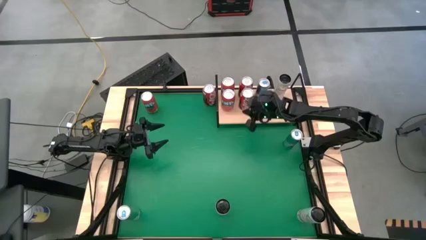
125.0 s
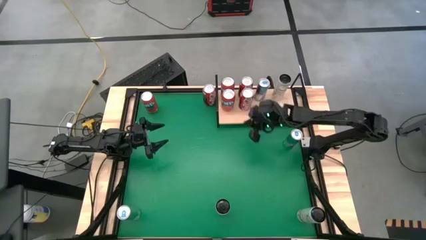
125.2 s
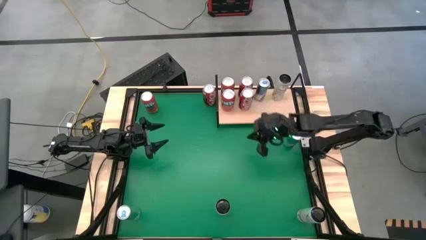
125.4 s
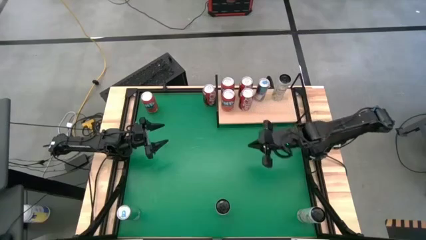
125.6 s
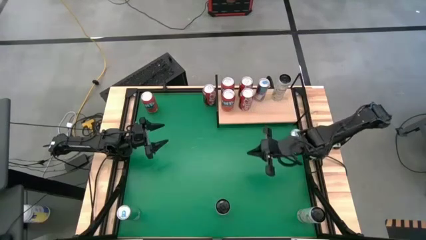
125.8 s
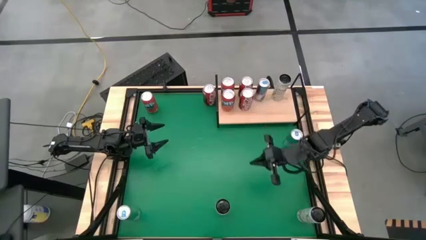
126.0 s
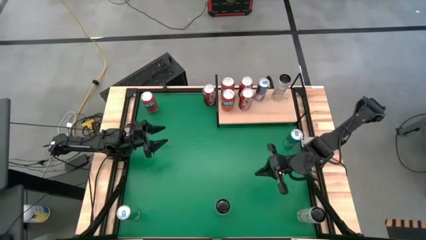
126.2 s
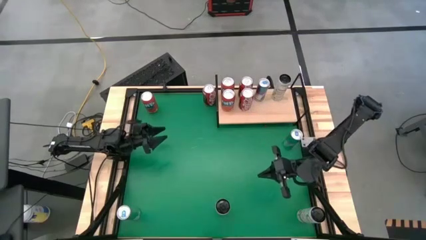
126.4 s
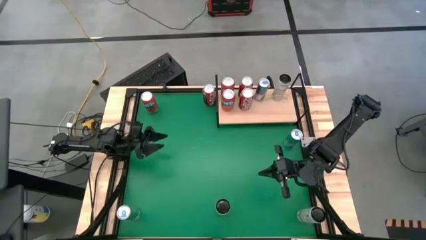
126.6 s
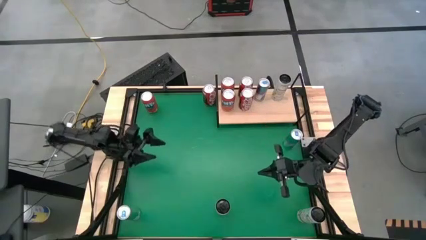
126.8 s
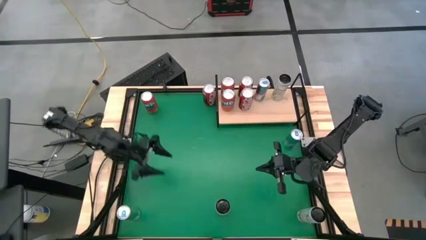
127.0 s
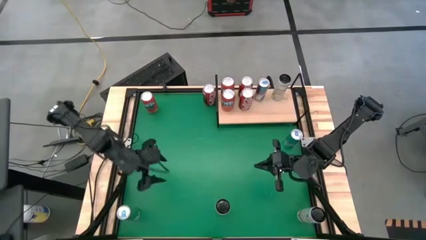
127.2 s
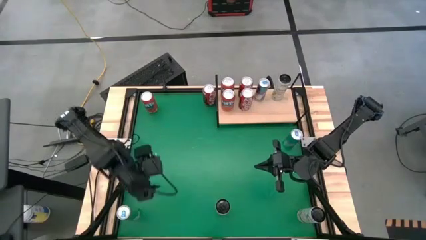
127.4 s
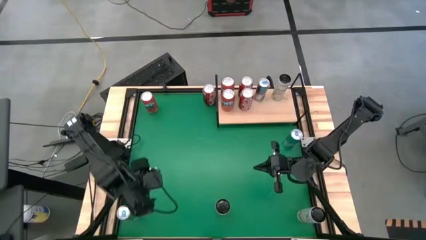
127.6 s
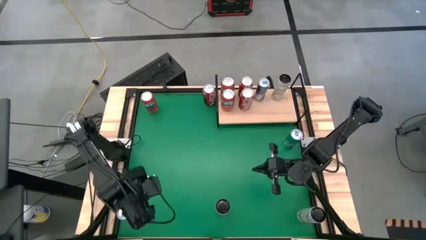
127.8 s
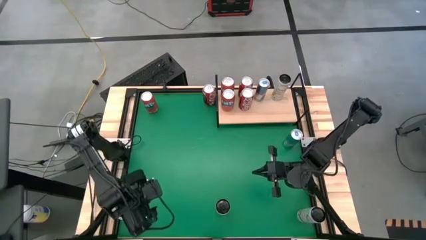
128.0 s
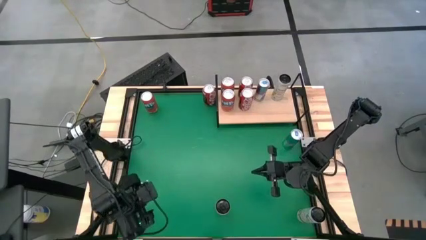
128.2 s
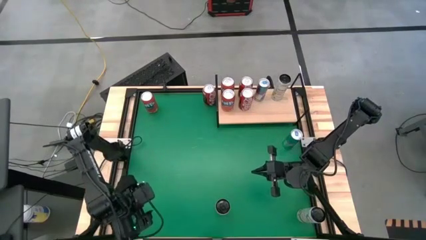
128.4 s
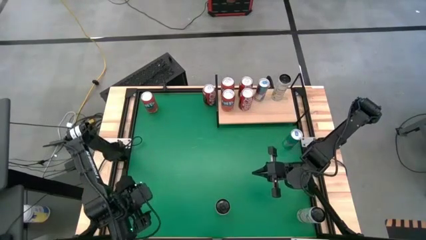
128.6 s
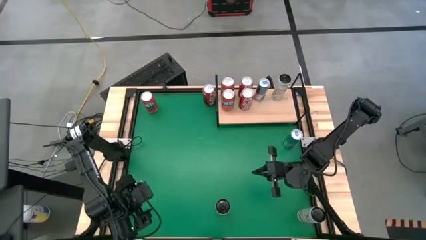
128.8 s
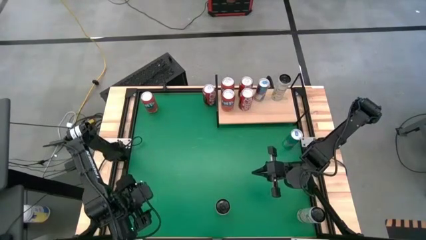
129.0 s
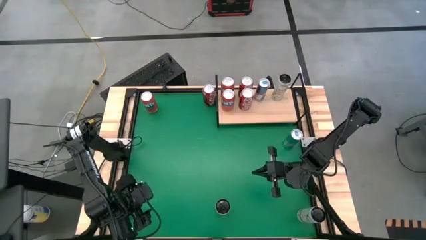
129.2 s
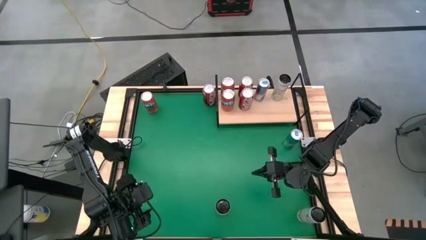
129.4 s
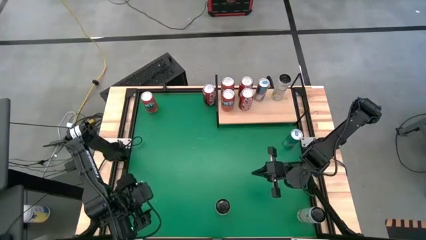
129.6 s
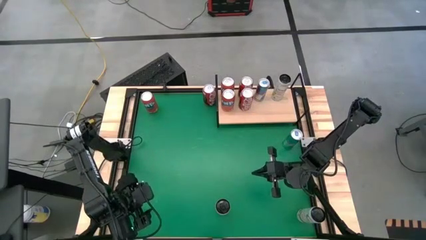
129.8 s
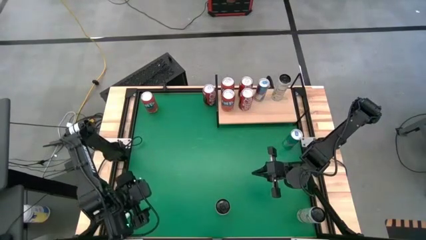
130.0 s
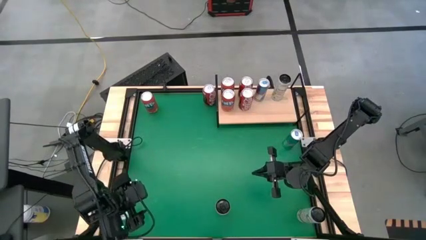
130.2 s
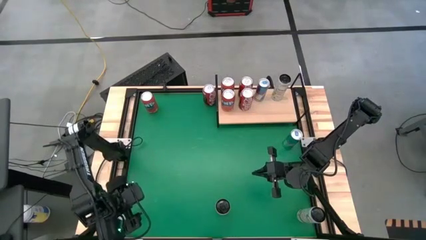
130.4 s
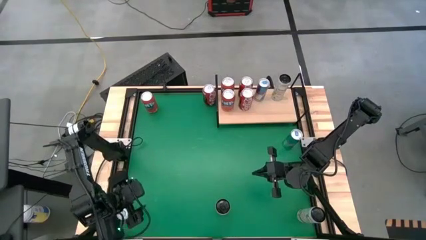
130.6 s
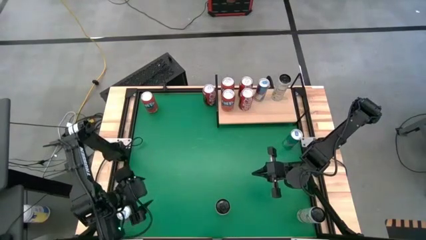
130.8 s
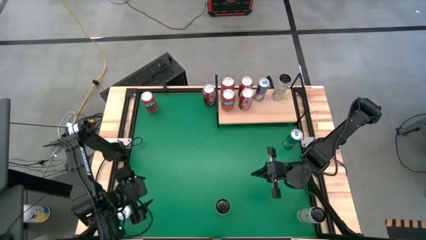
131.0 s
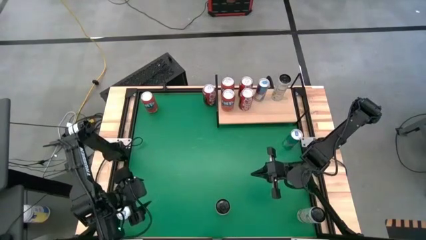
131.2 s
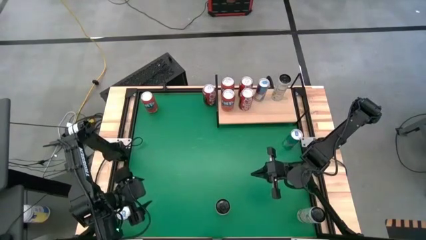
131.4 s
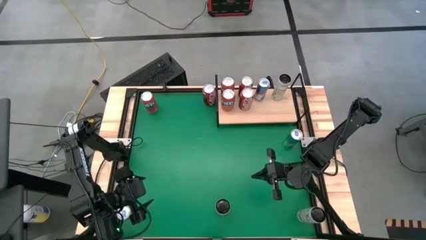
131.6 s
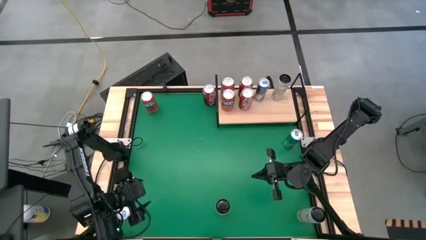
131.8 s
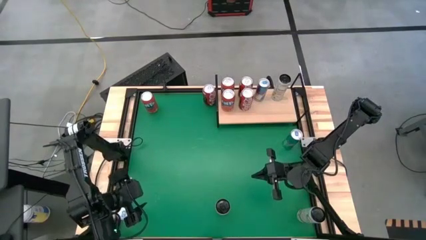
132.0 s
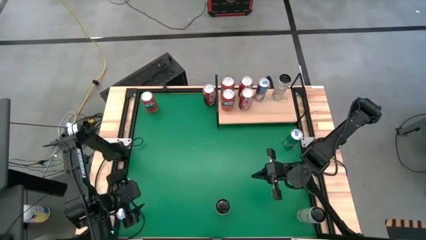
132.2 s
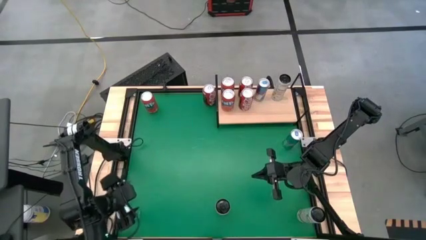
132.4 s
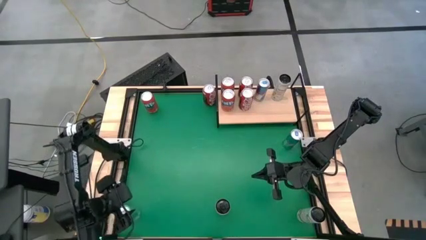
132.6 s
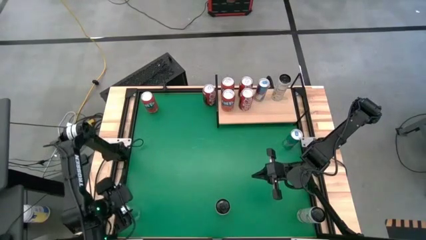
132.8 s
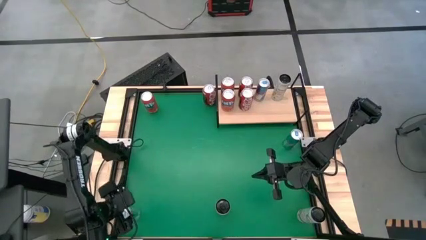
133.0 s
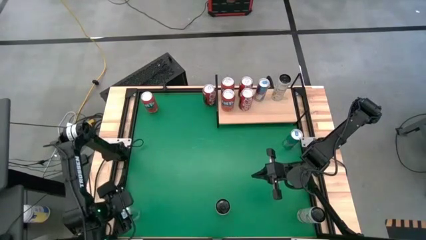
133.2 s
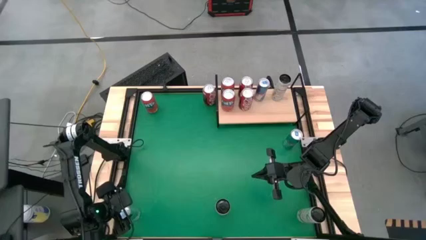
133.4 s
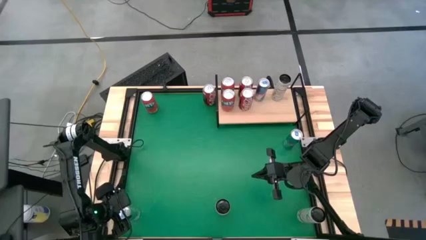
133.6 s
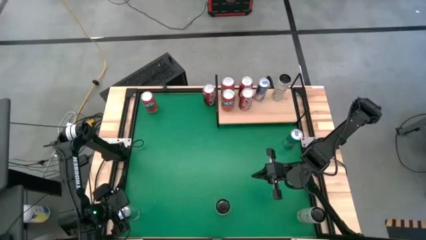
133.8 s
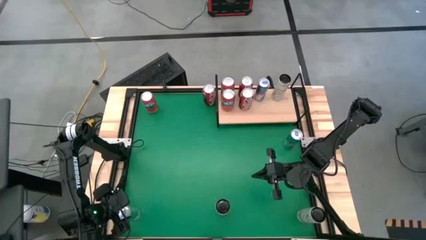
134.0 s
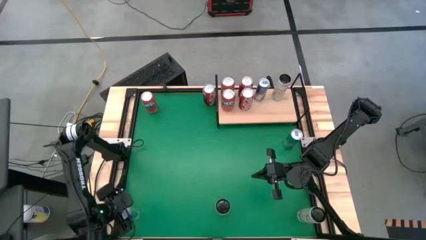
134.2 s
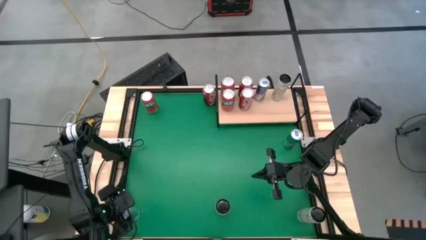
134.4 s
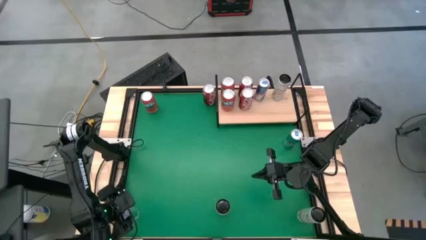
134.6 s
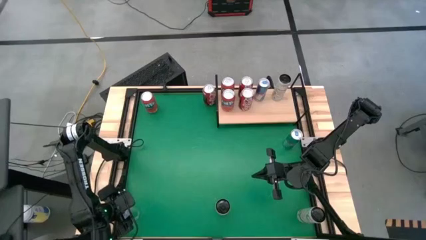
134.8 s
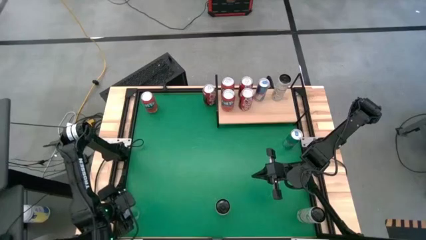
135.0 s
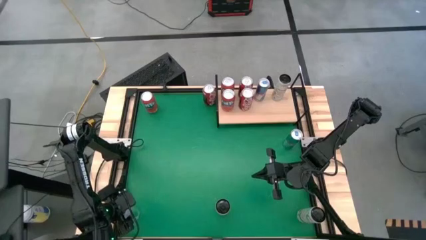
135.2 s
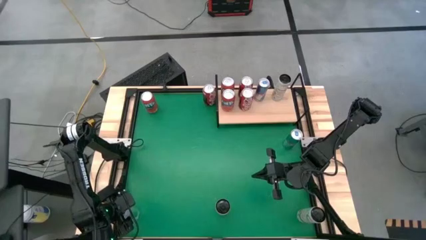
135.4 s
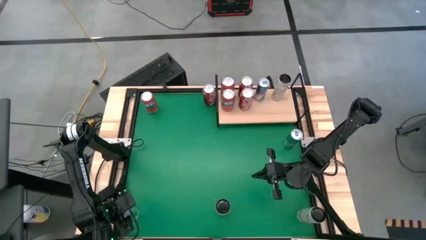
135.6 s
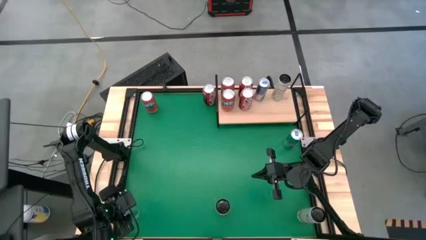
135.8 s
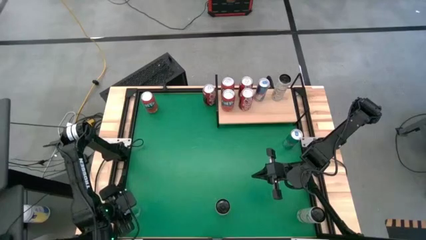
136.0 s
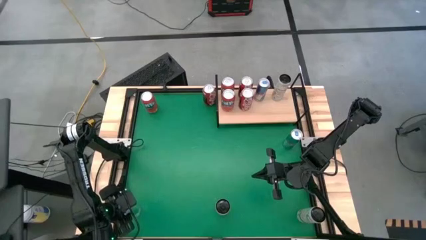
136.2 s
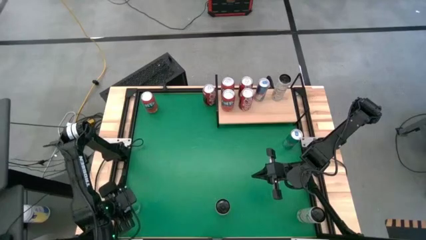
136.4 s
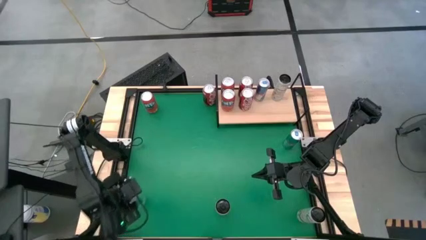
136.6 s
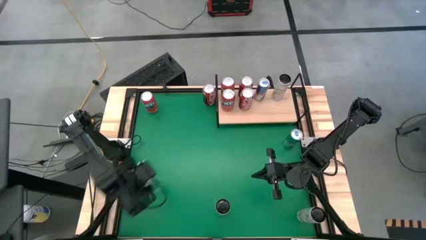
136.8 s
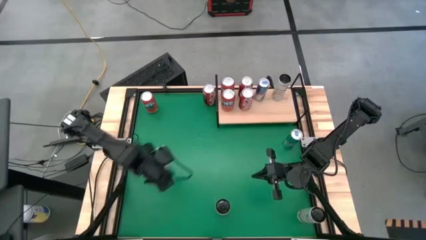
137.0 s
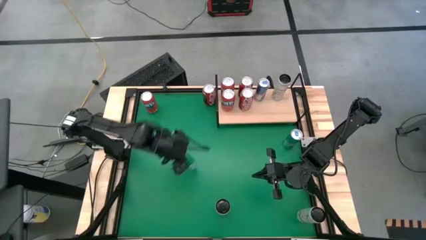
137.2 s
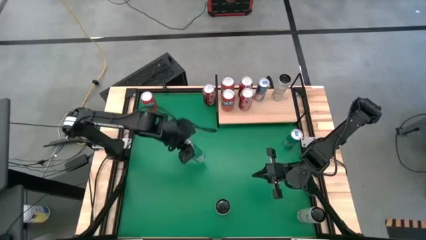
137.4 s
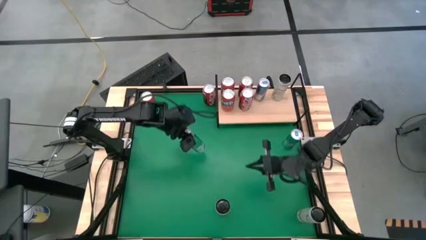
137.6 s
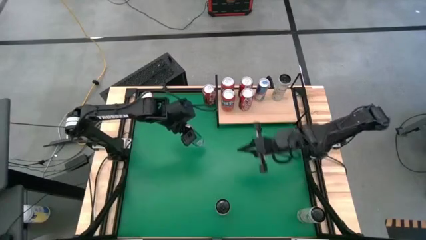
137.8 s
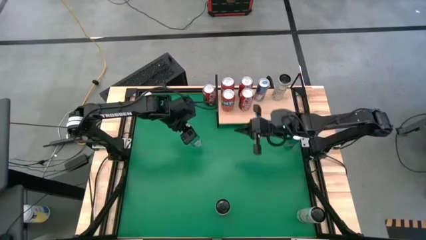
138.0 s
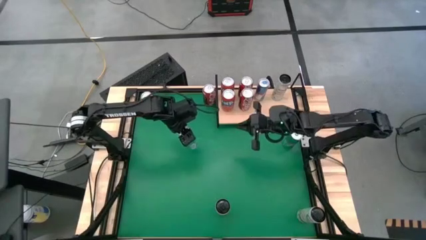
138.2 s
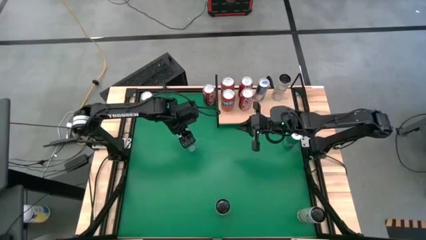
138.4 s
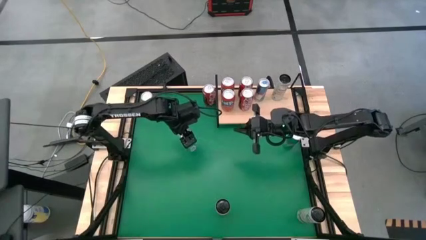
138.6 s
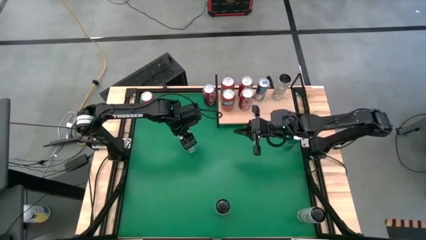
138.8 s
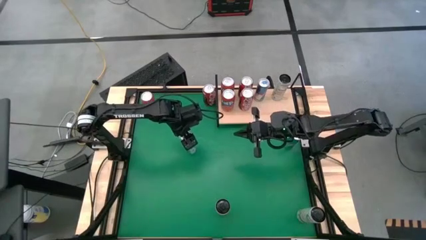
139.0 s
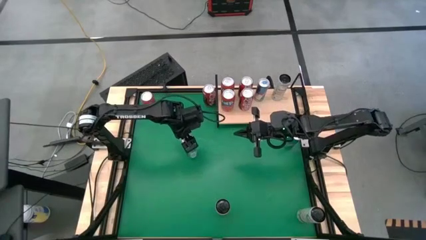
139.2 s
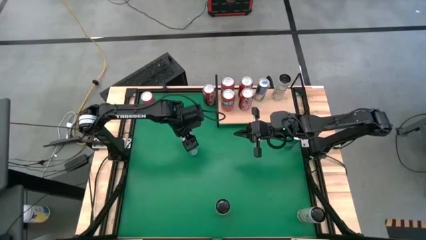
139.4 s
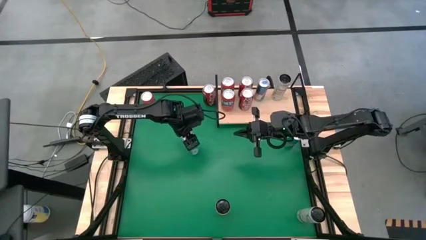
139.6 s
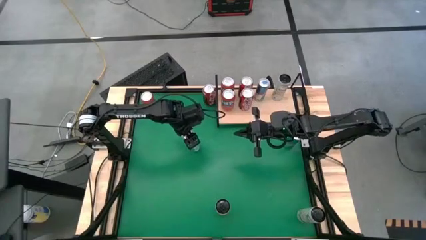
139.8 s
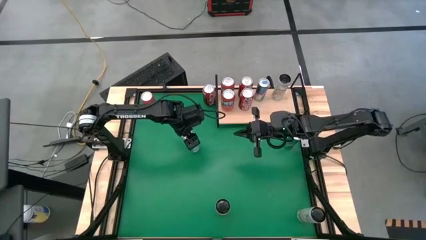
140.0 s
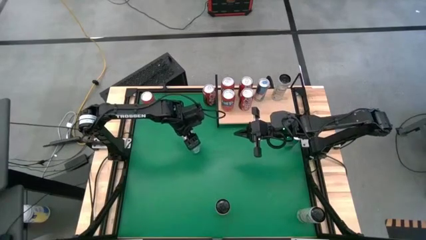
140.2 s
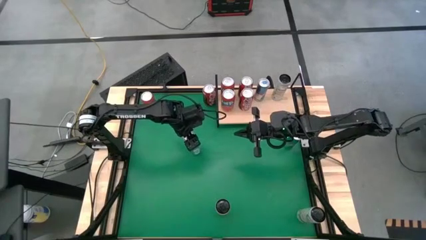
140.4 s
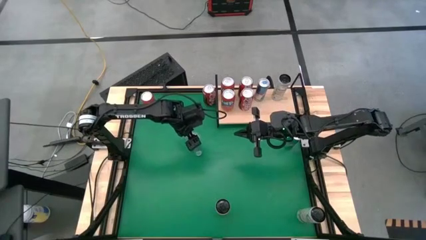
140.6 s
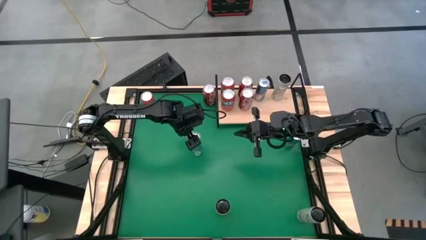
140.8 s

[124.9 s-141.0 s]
Task: Place canned beverage on shelf
Move the bottom blue soda can to the middle left of the table
